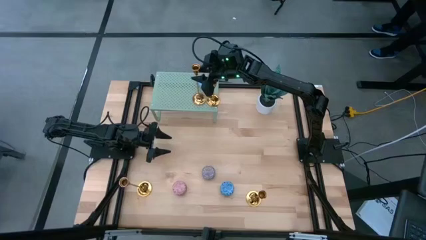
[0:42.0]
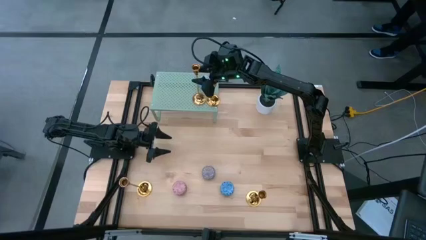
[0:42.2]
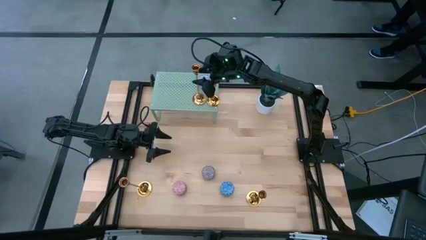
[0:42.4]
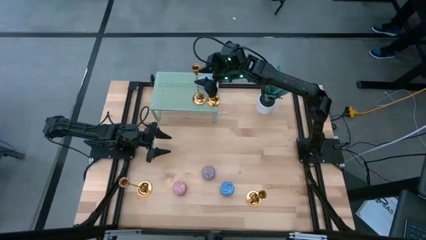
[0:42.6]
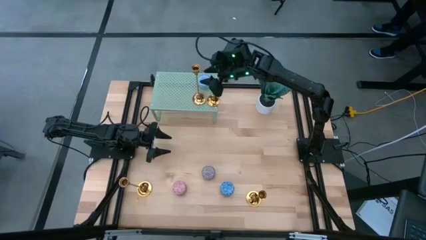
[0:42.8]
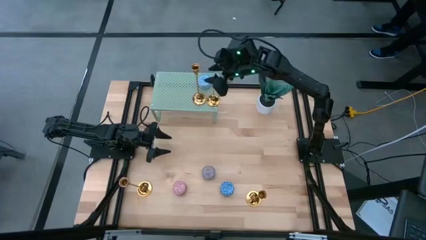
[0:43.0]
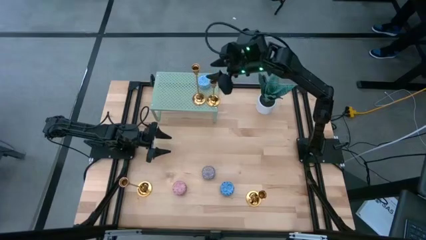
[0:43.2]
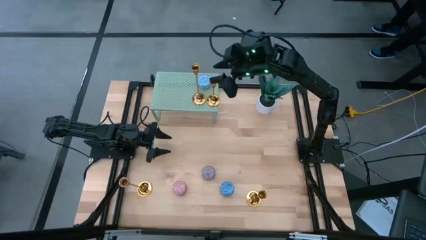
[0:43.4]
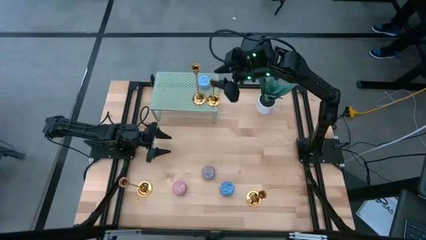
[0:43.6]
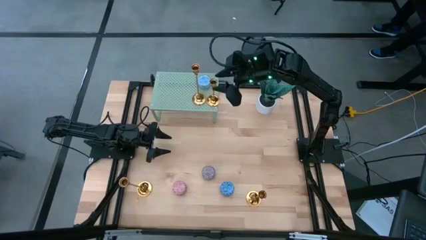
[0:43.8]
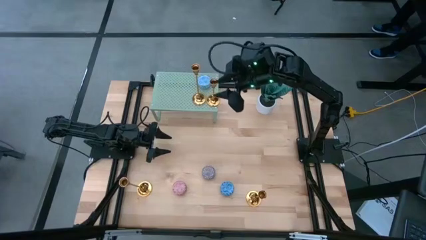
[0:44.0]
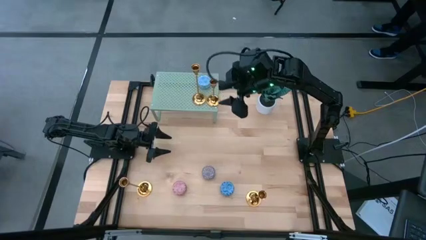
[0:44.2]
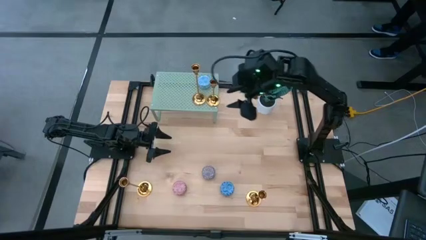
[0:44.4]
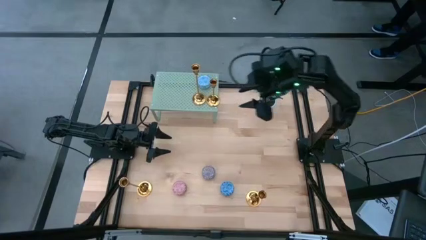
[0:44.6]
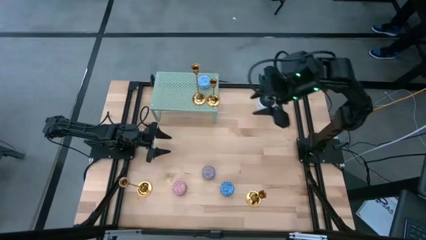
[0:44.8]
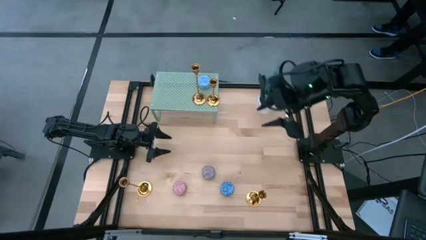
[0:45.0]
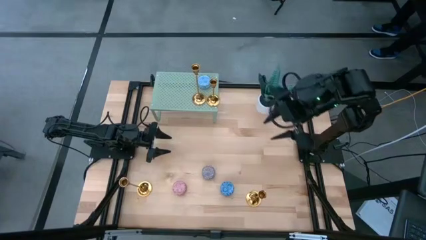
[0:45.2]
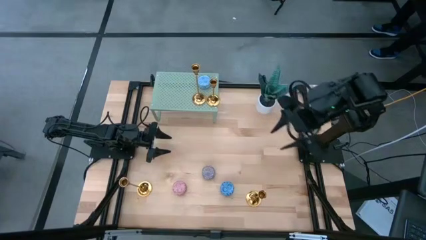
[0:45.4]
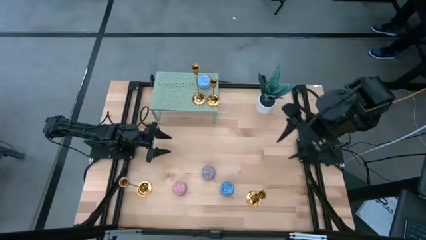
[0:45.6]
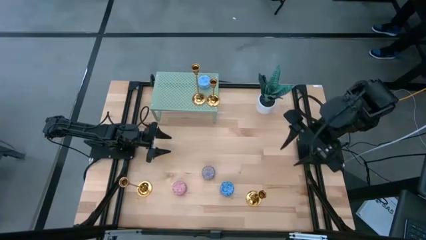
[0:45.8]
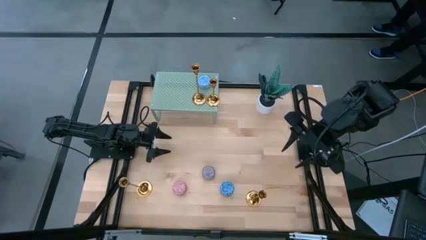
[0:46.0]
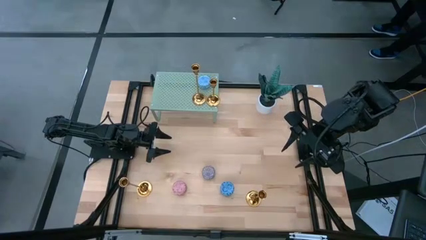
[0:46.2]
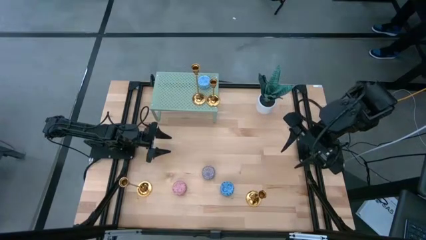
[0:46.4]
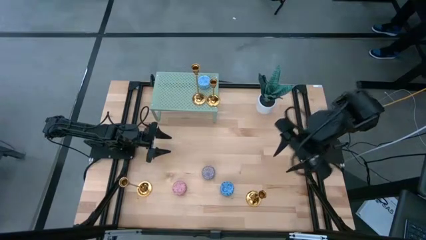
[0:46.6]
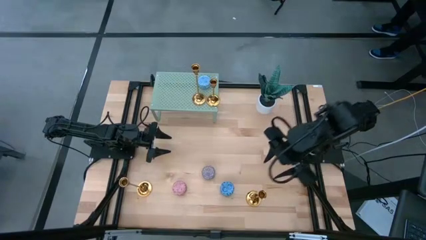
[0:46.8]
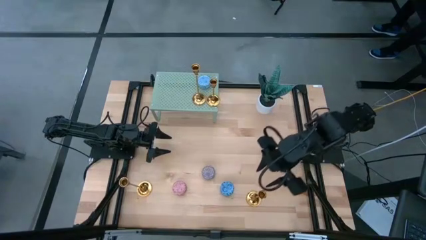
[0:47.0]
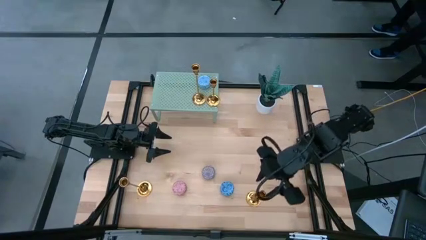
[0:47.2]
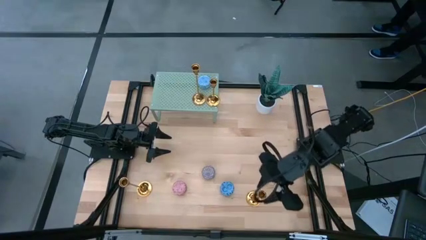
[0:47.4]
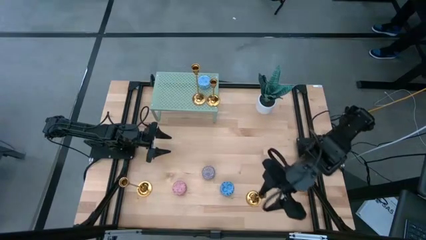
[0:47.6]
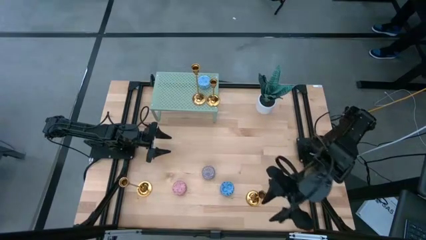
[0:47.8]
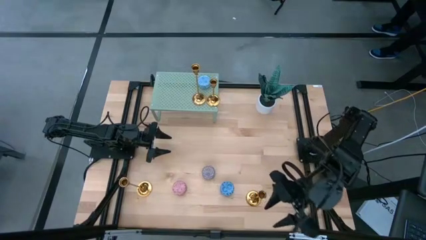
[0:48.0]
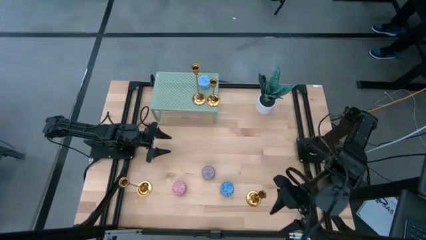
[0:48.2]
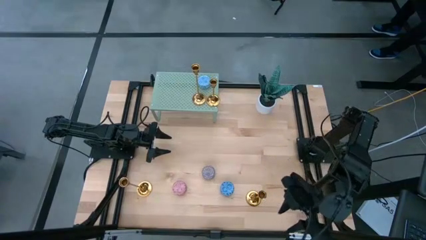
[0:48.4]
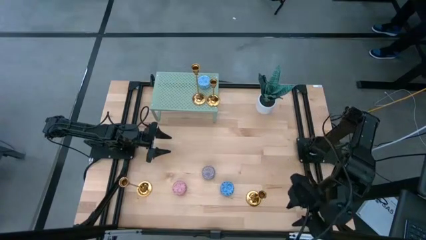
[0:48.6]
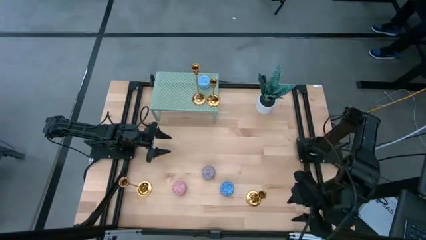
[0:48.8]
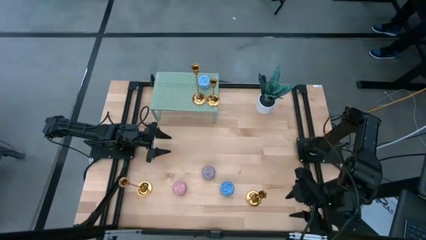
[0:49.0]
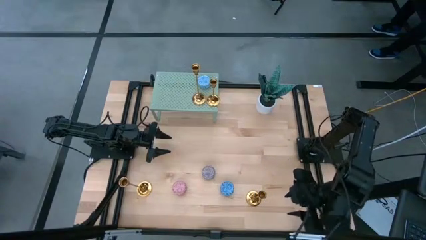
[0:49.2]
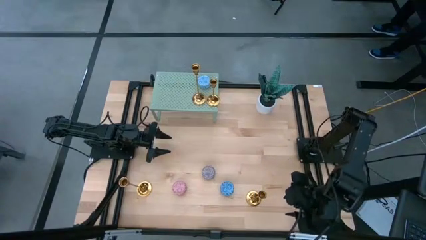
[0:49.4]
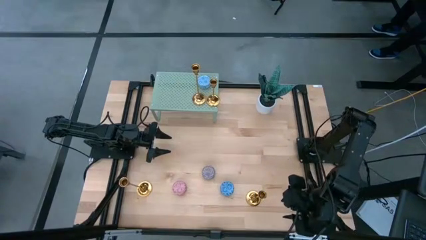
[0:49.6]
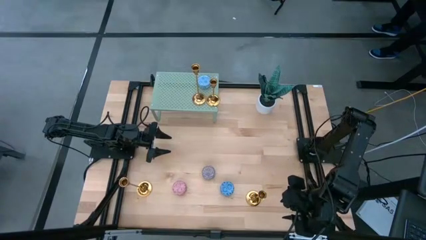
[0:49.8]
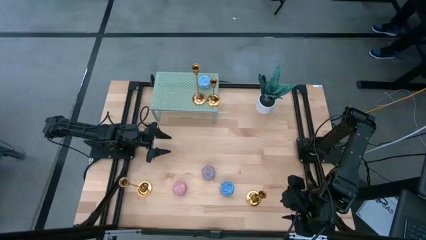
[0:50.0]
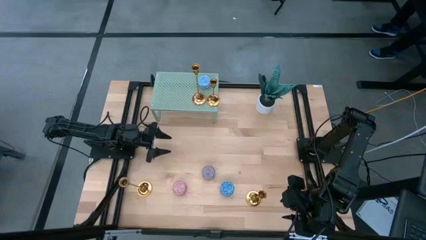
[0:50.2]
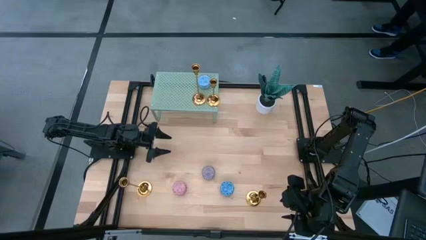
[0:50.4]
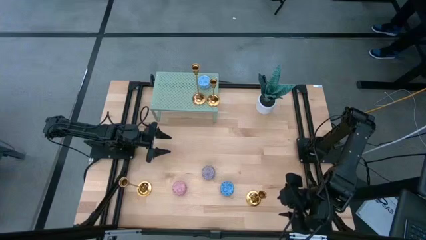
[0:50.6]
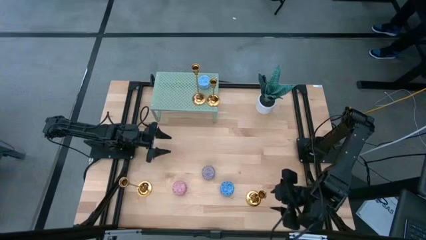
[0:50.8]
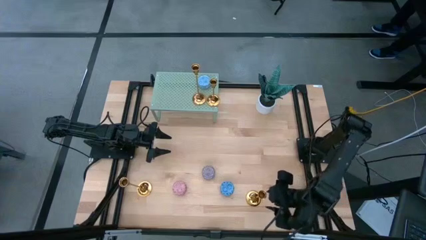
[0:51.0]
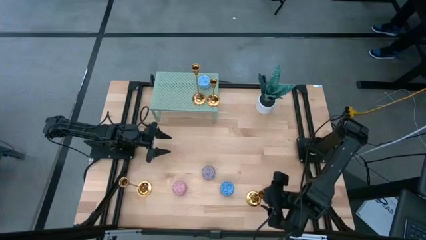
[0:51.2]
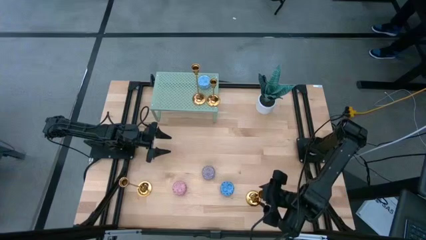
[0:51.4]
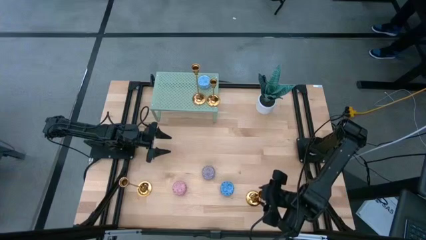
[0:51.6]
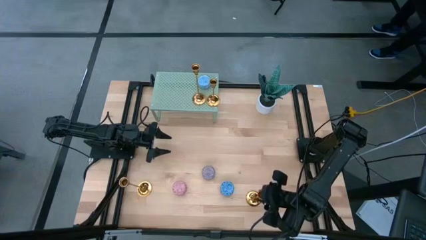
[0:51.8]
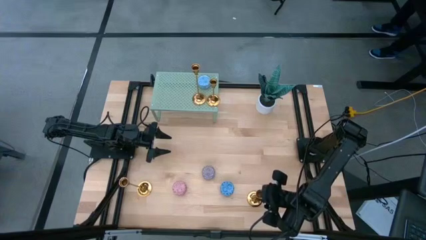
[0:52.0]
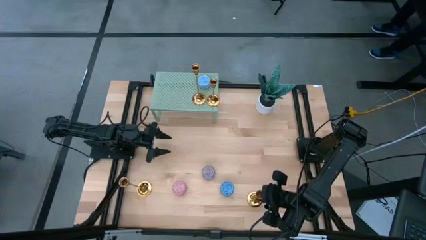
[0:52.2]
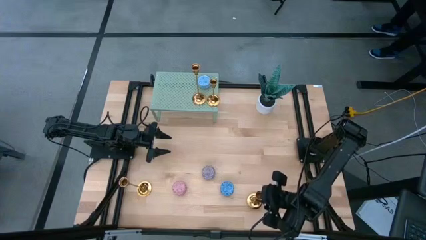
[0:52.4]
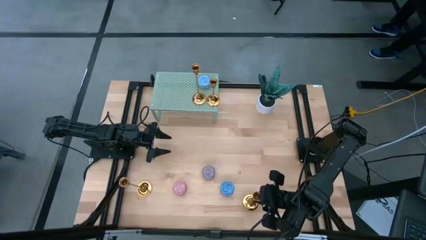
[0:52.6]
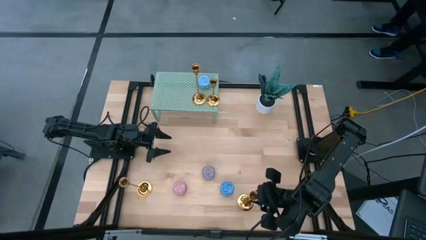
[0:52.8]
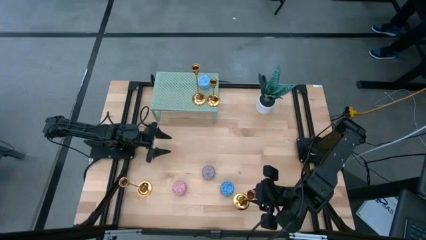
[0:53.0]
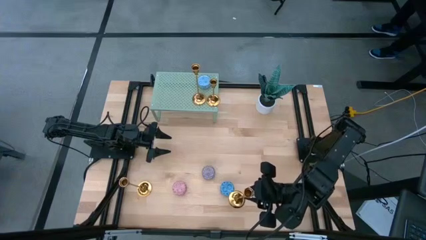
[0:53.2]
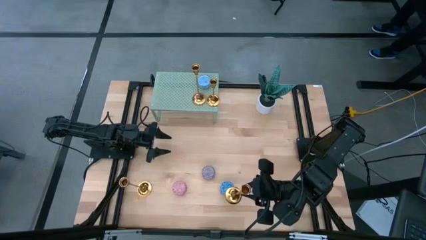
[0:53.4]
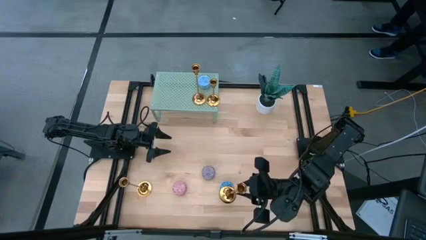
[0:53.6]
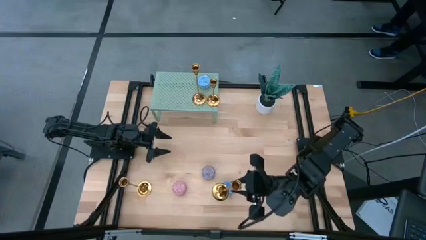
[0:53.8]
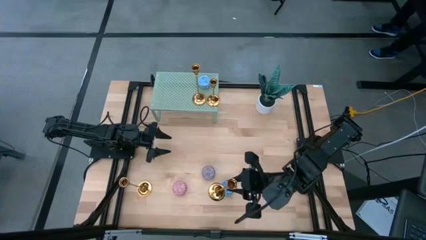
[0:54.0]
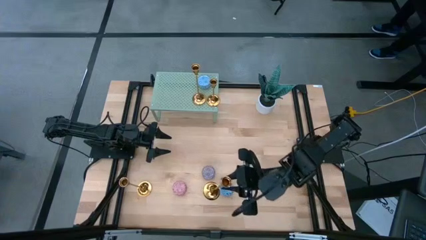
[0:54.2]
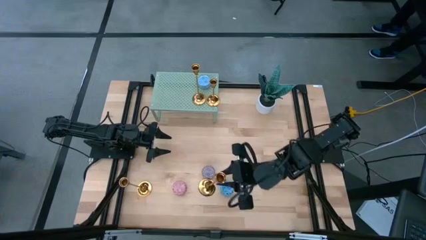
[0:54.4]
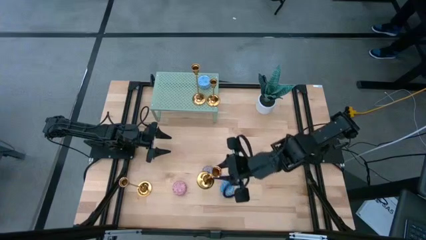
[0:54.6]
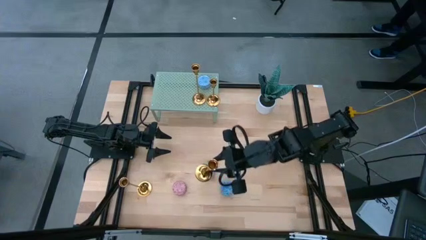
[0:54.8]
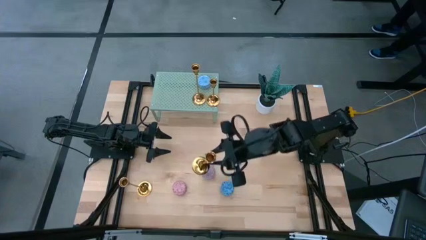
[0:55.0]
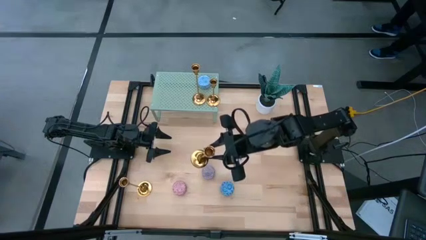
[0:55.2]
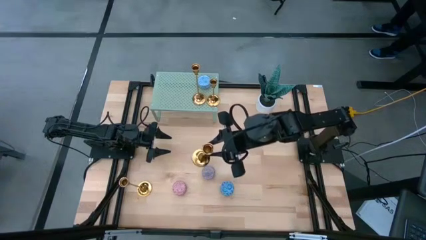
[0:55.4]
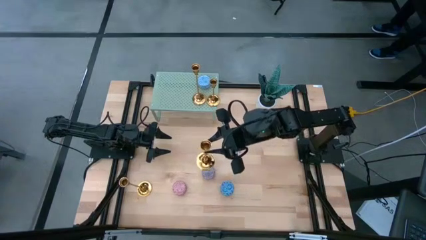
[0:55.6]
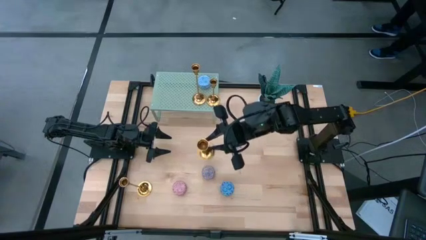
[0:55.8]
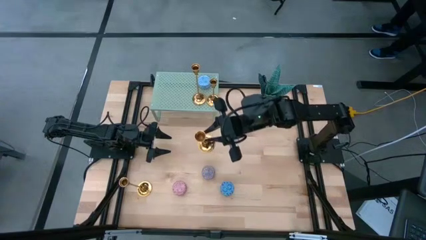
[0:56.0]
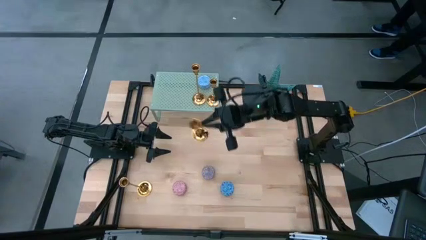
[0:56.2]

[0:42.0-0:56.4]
Task: Pick & Place candle stick holders
Put the gold candle holder on the shelf
